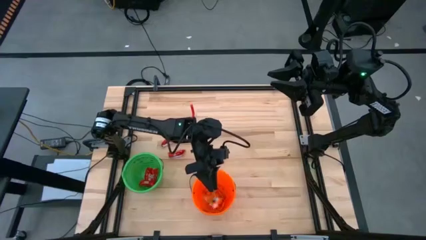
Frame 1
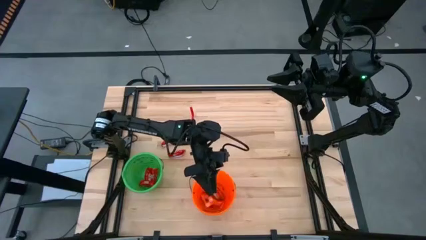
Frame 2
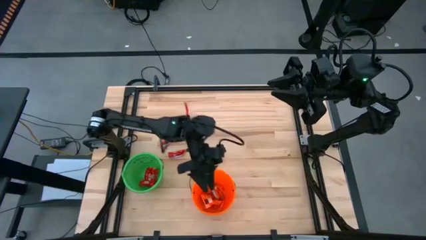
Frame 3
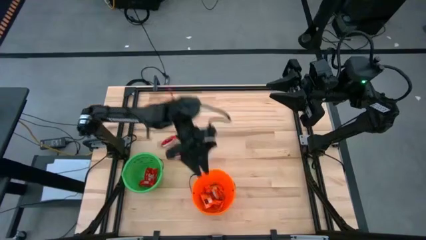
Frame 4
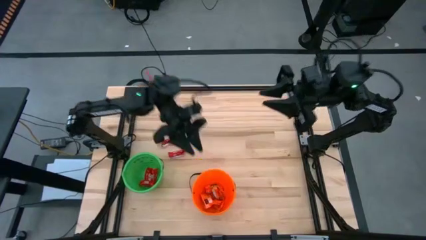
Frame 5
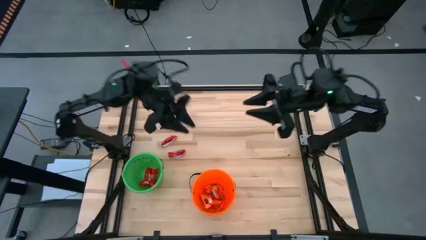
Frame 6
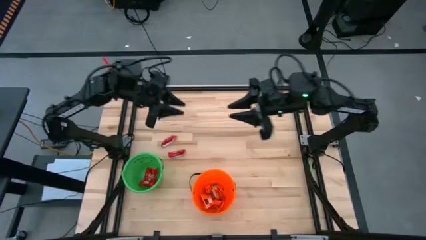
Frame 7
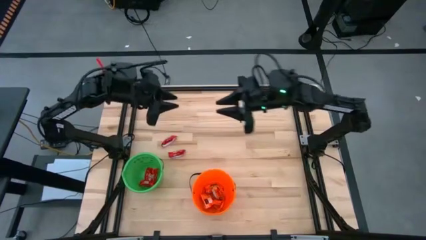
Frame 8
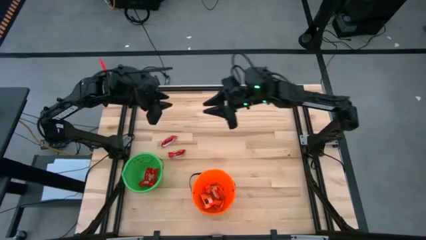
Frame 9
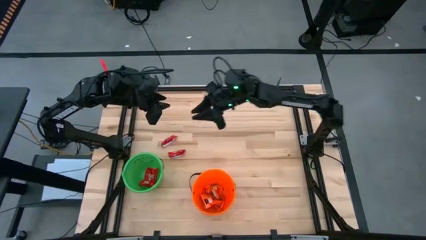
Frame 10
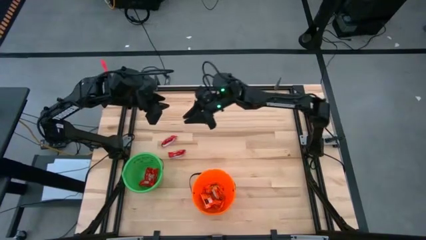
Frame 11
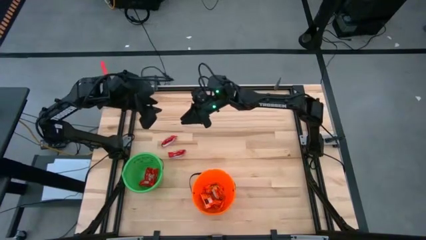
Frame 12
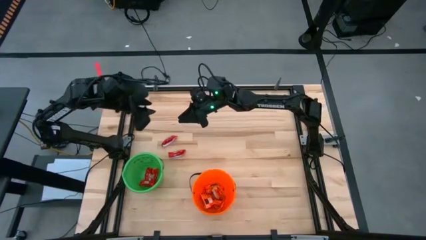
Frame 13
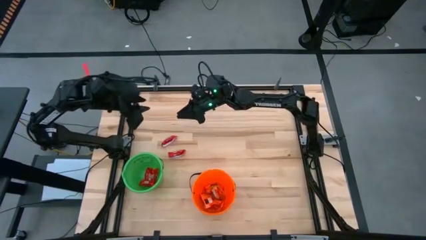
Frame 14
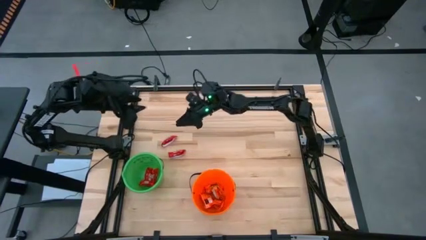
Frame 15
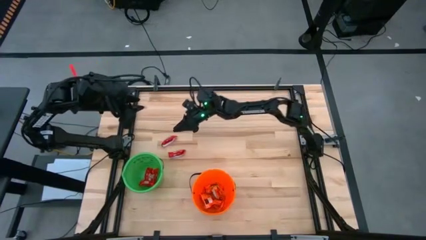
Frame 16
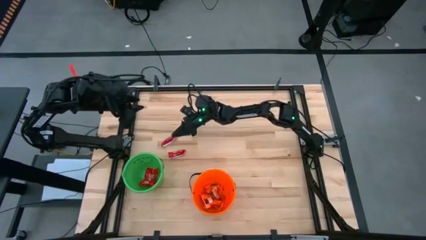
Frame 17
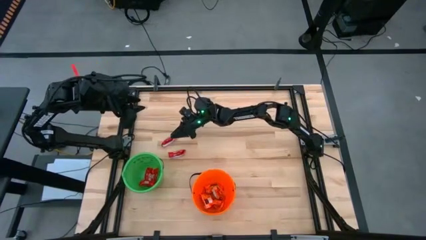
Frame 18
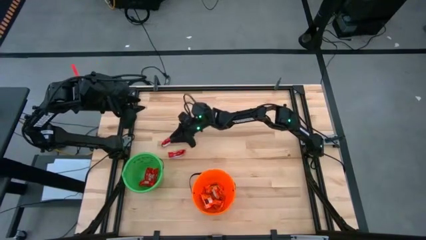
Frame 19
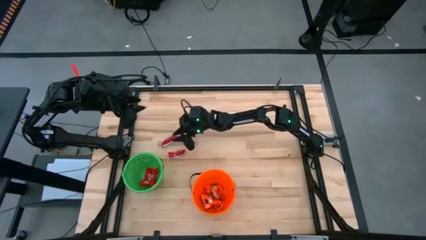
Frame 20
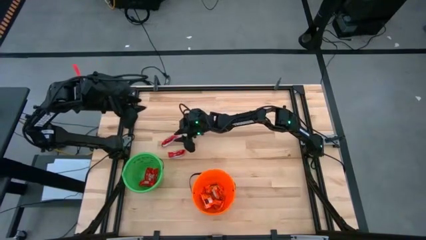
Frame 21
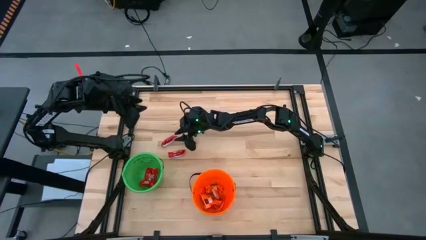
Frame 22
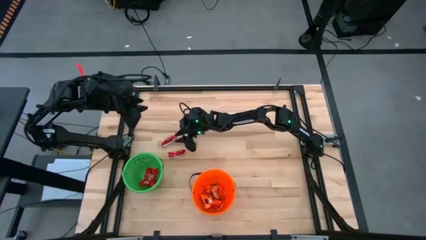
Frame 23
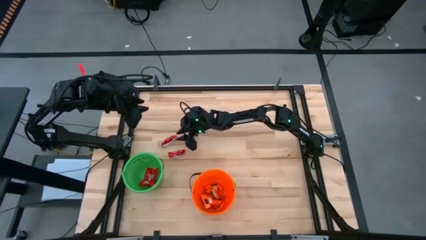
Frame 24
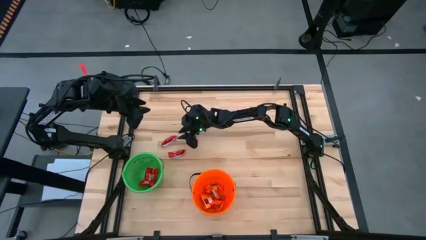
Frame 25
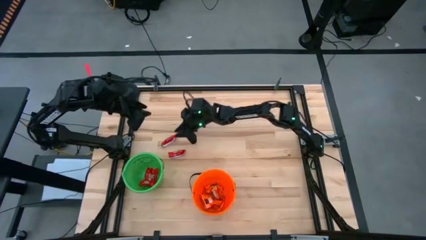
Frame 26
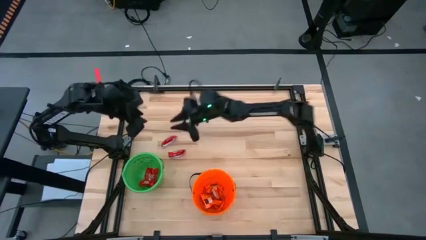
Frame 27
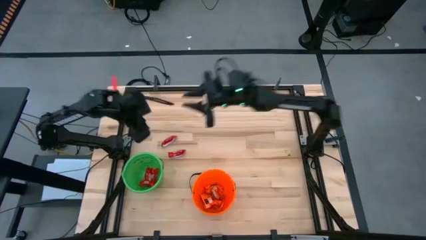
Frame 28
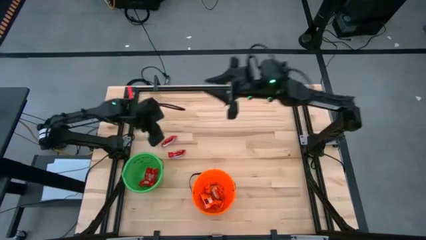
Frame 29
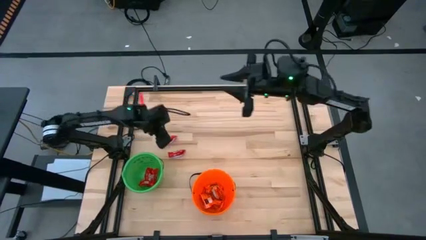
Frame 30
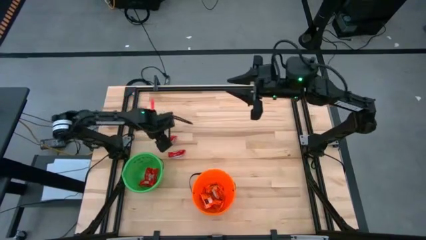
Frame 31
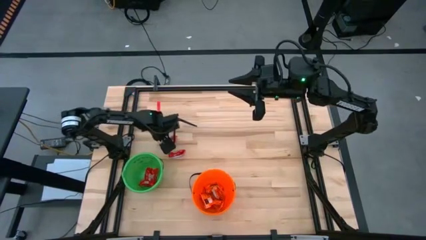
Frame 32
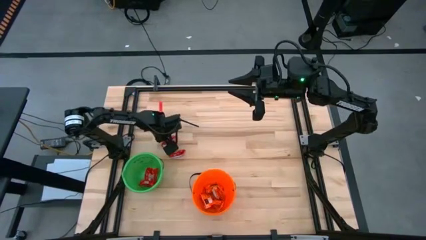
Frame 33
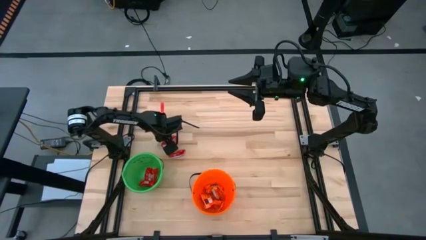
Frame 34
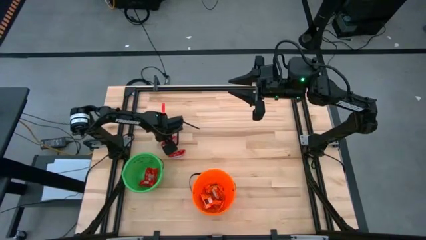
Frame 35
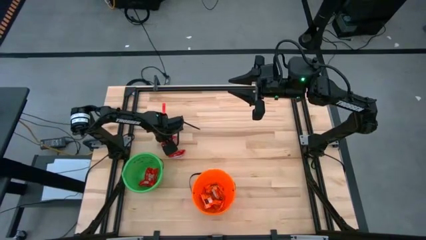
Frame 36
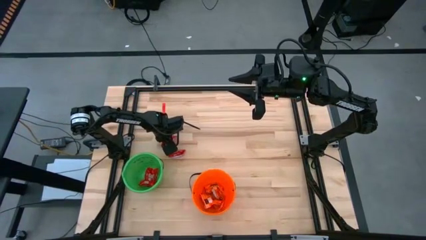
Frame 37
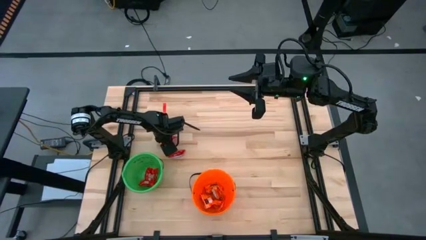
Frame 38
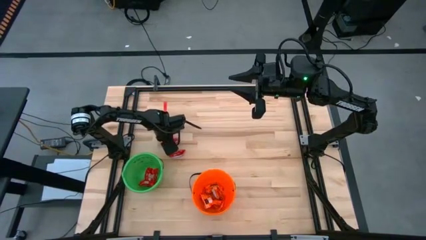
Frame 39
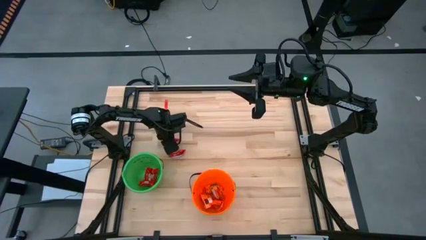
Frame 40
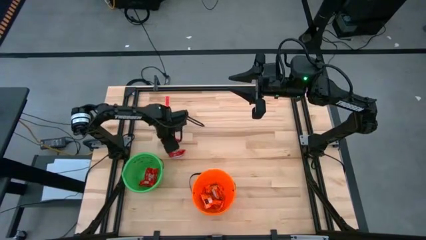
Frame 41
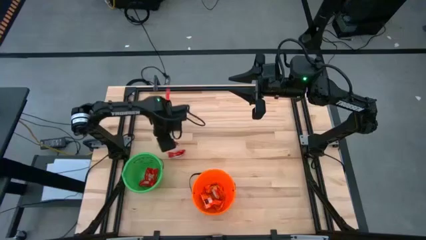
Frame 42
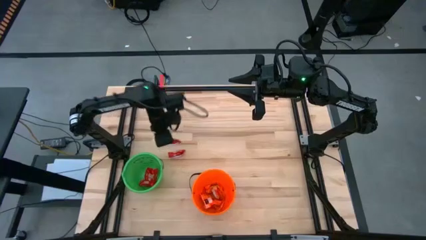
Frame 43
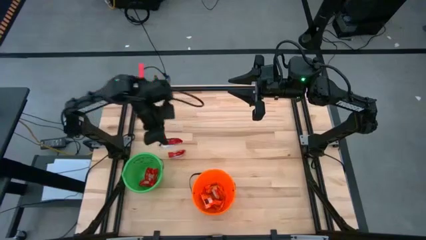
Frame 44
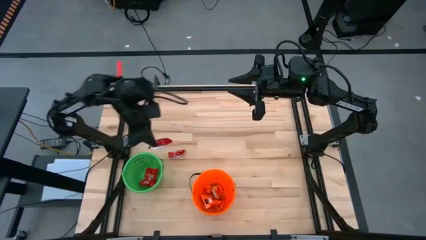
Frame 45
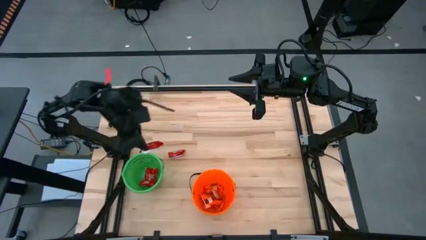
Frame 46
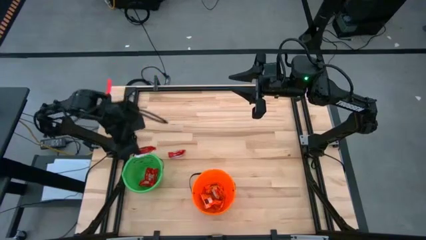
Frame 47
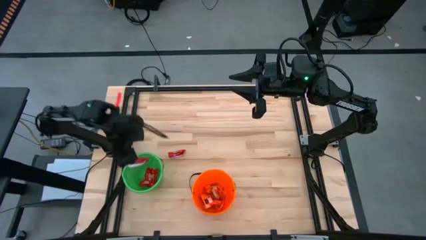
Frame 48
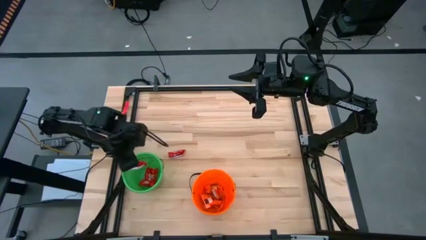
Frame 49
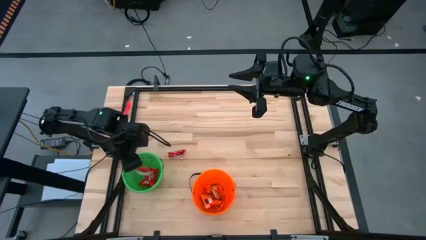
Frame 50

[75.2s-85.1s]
Put the red chocolate into the green bucket

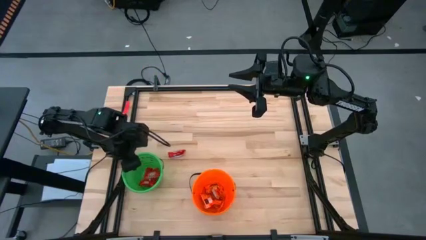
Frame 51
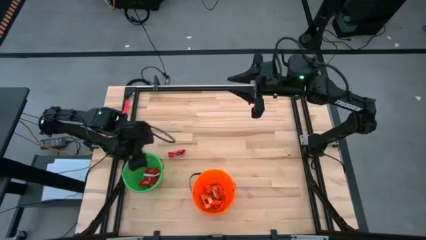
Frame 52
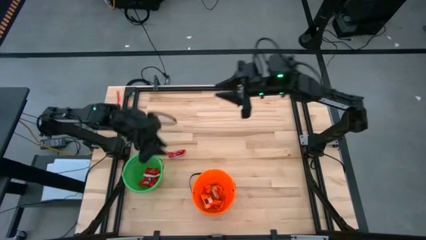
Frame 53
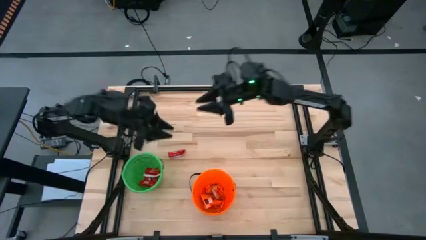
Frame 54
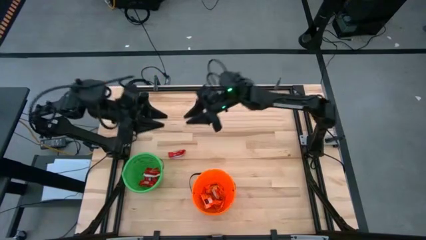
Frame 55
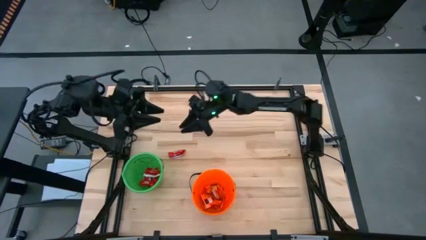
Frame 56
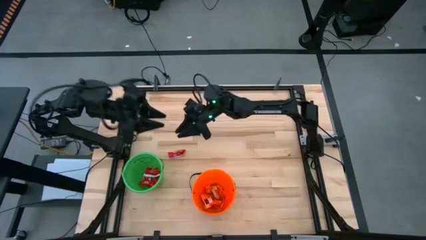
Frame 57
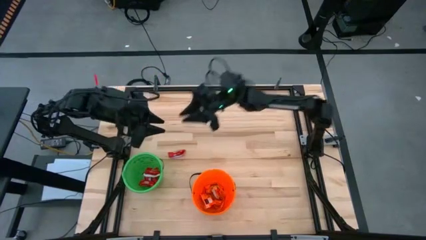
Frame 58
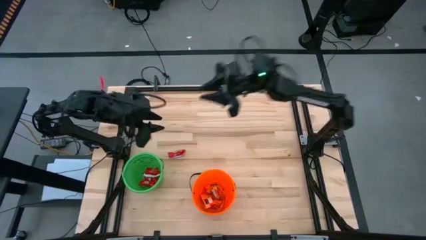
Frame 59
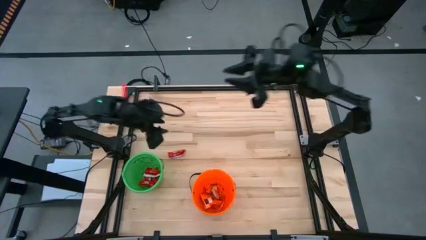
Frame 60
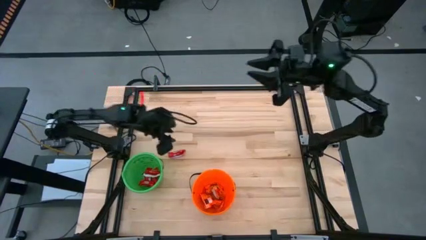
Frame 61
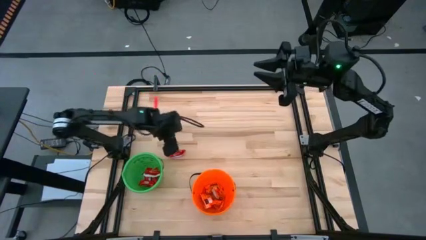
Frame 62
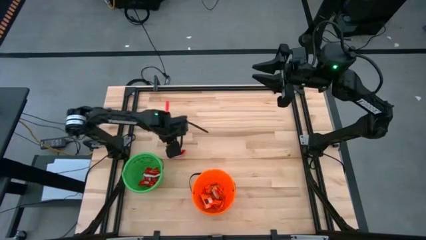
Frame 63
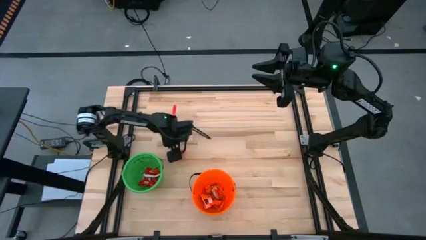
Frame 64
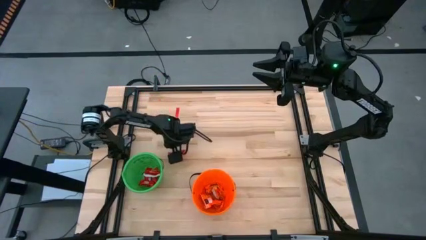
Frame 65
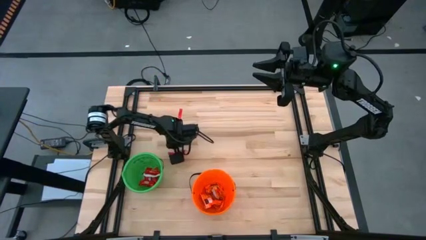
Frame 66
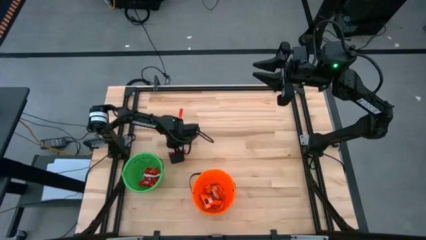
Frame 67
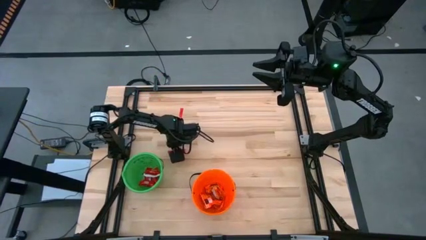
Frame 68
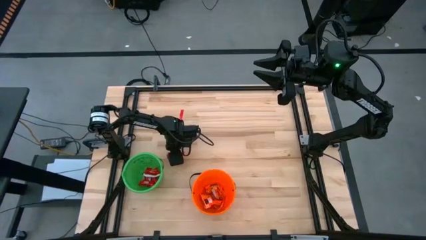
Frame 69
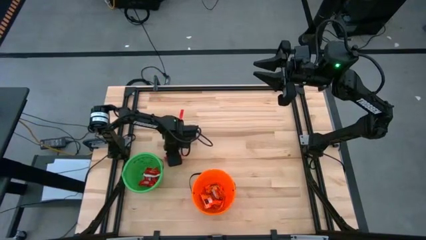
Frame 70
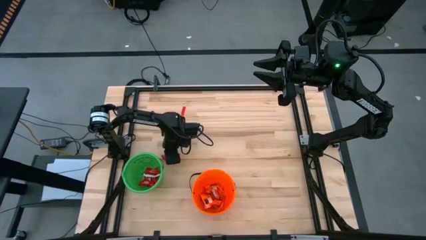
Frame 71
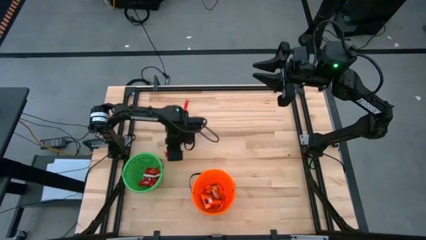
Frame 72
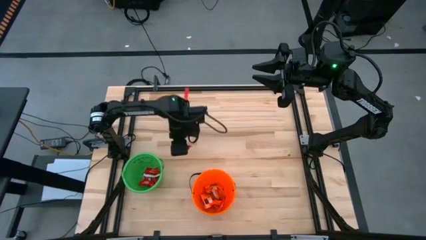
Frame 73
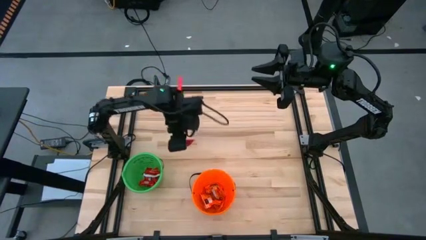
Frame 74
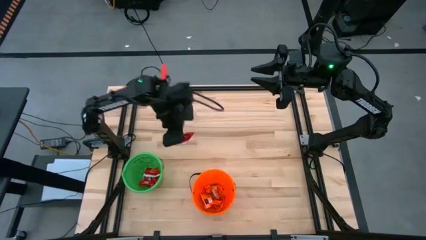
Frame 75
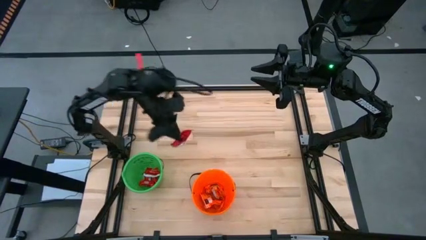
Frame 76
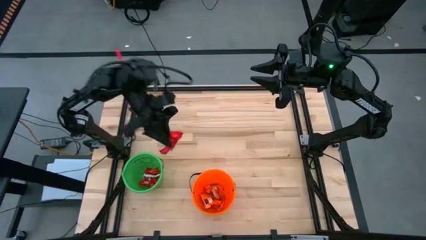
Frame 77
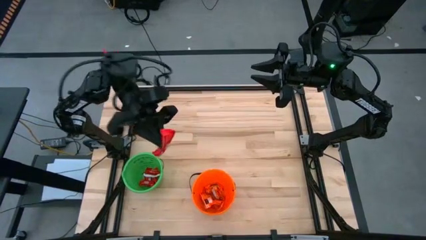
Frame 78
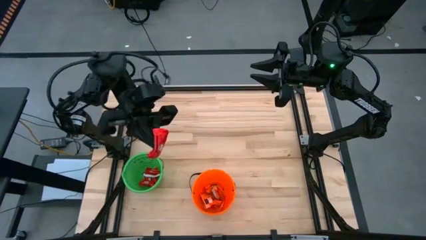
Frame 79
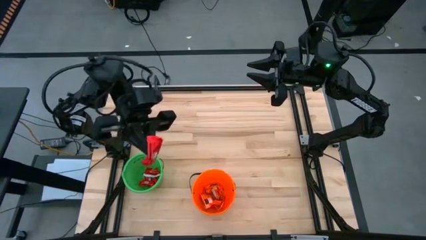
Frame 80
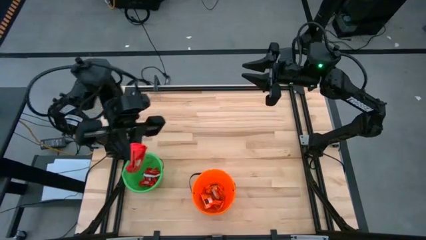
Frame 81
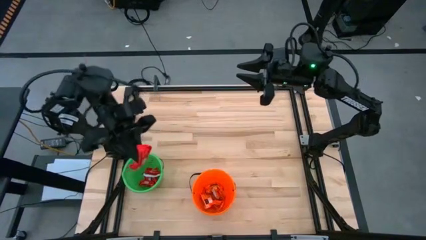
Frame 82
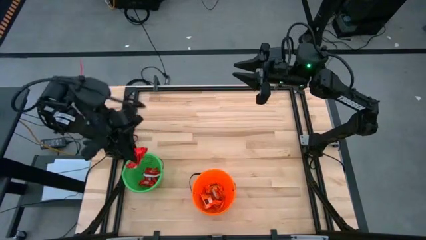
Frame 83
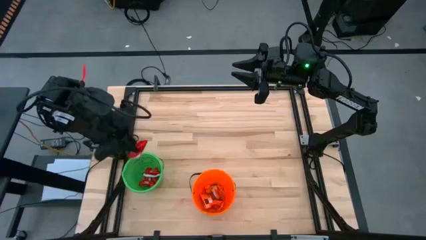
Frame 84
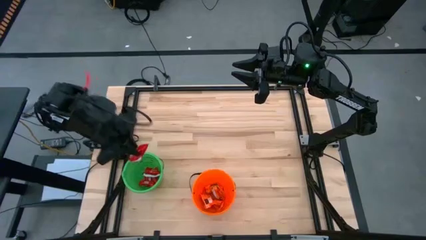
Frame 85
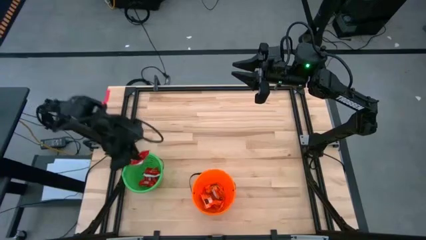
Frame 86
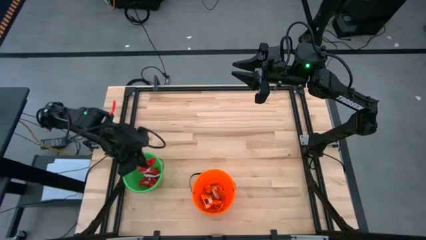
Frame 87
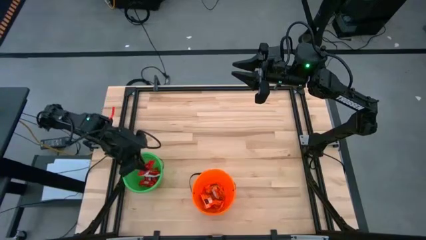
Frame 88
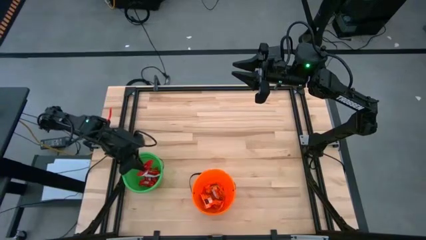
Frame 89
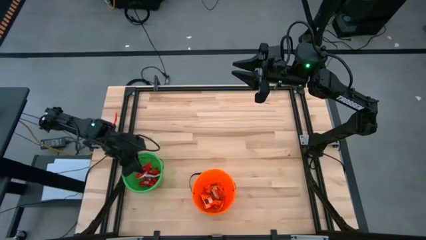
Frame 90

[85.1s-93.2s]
Put the red chocolate into the green bucket
